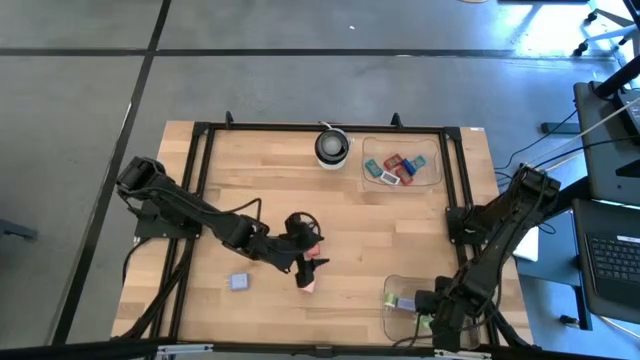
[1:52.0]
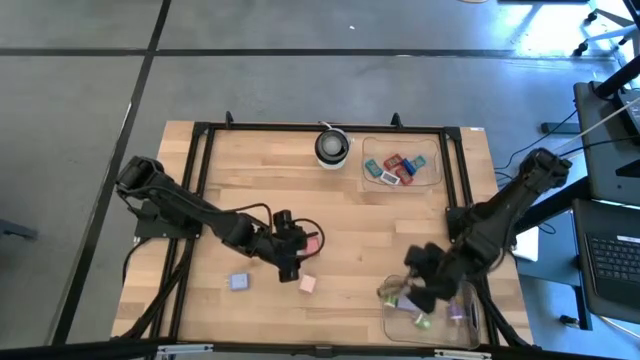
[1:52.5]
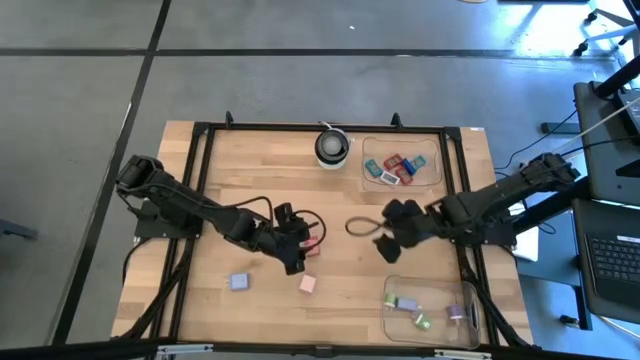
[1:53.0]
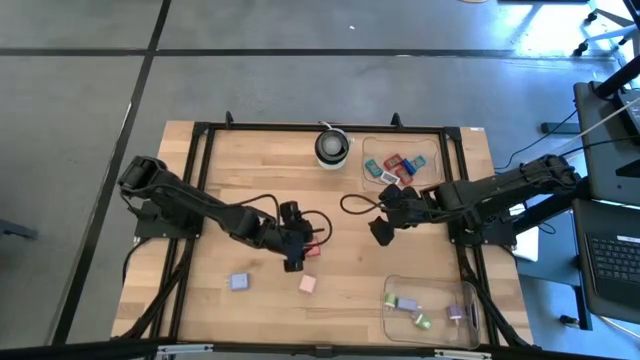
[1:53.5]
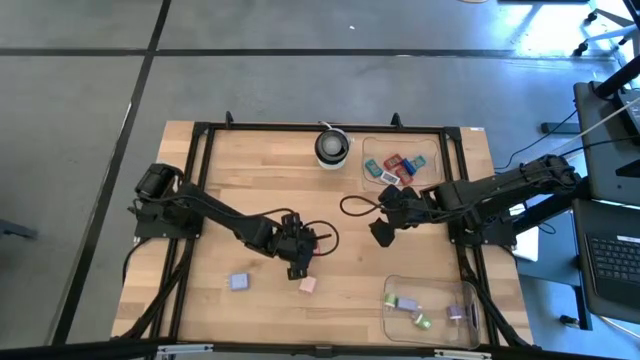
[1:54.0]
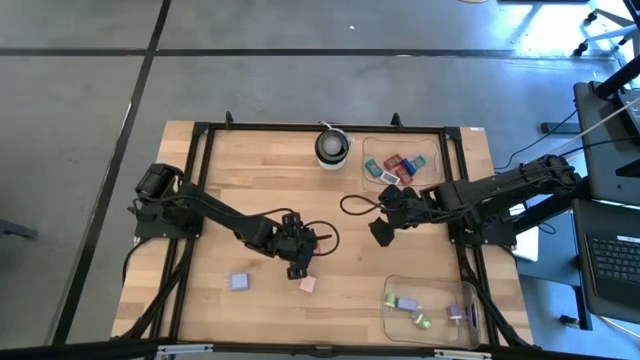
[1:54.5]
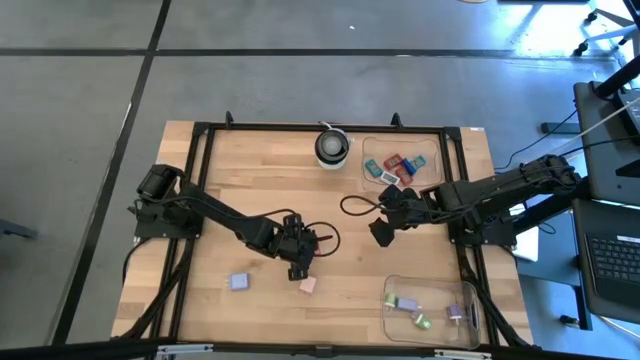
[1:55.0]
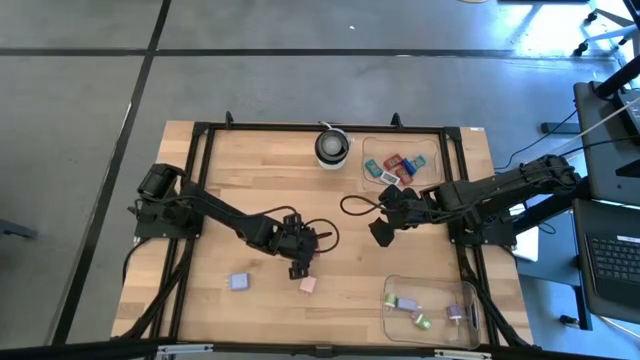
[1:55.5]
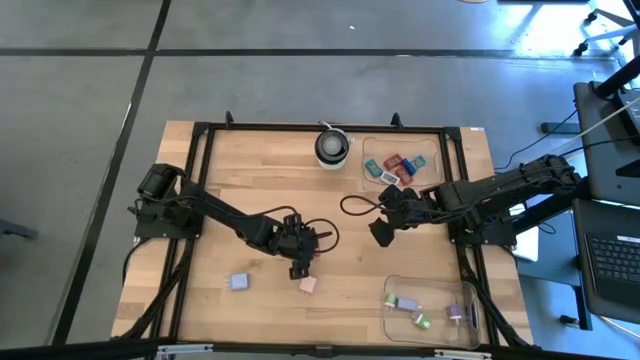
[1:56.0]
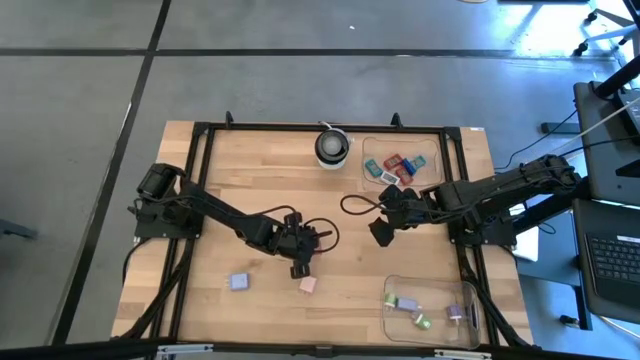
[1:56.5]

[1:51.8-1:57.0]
Task: Pick & Place Office items
Put the red charger adapter into the bottom transparent bin

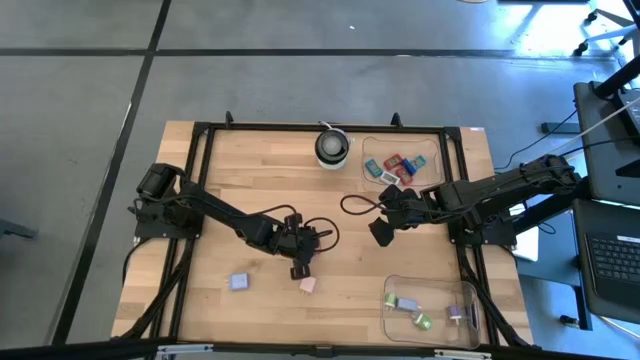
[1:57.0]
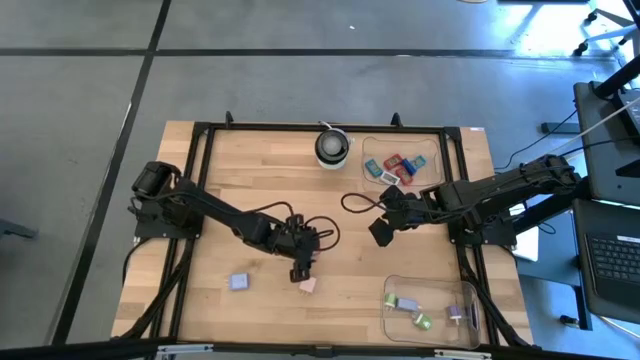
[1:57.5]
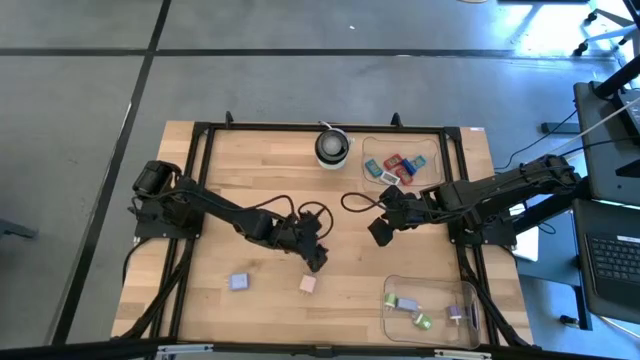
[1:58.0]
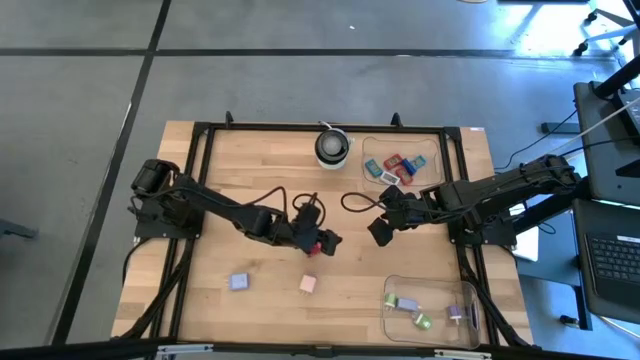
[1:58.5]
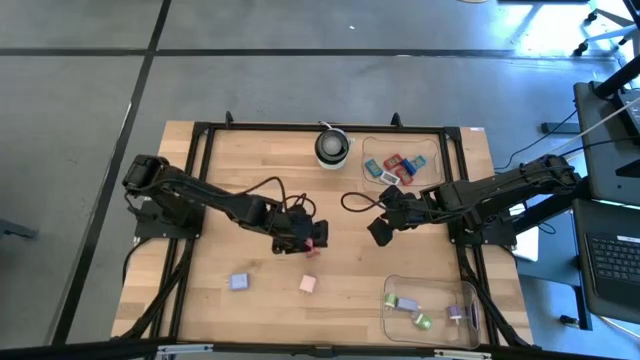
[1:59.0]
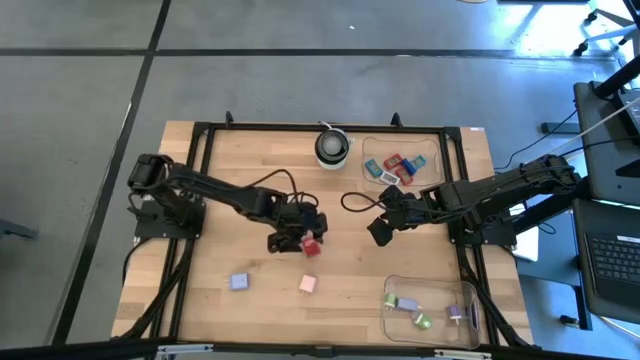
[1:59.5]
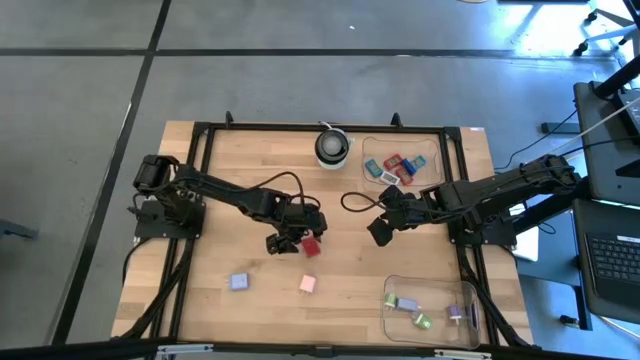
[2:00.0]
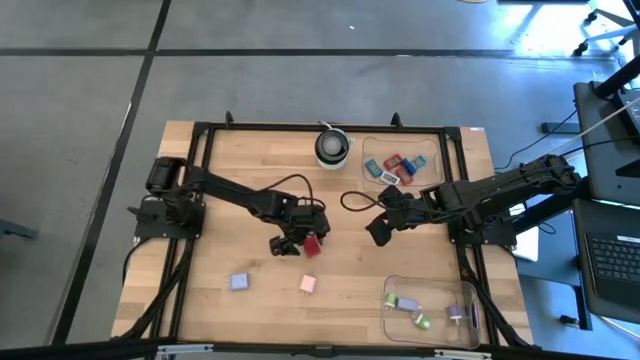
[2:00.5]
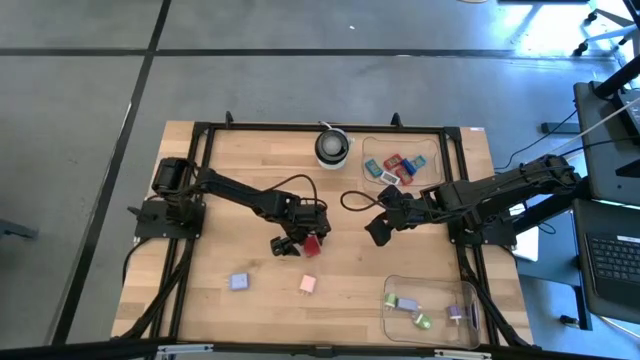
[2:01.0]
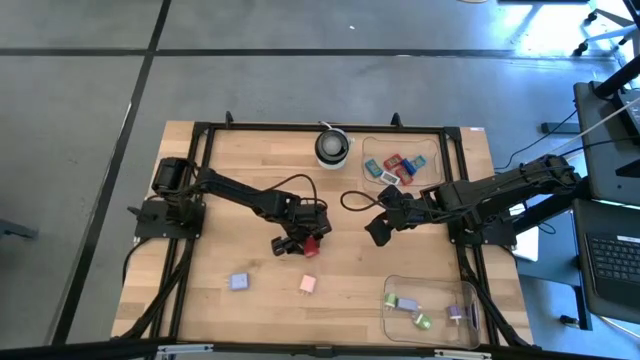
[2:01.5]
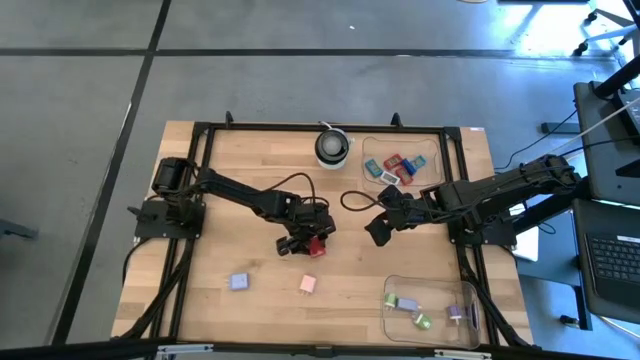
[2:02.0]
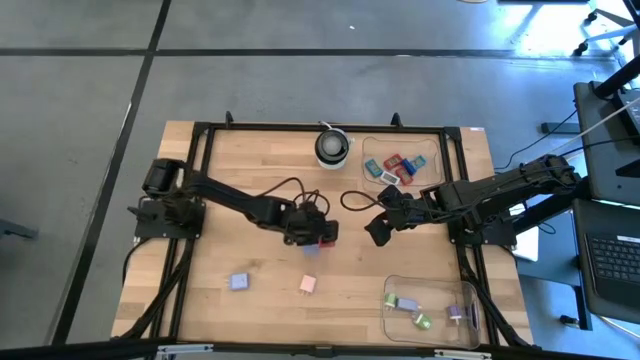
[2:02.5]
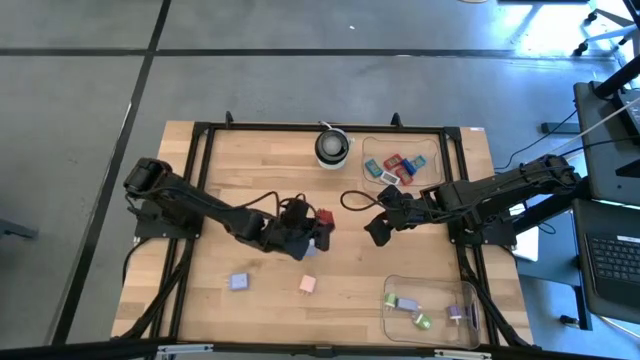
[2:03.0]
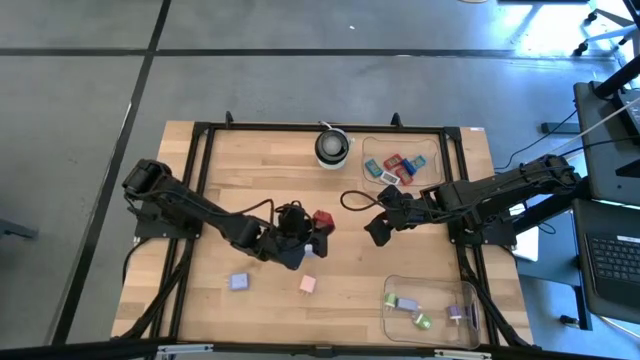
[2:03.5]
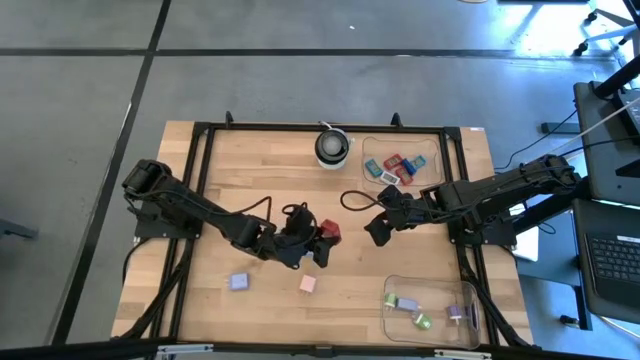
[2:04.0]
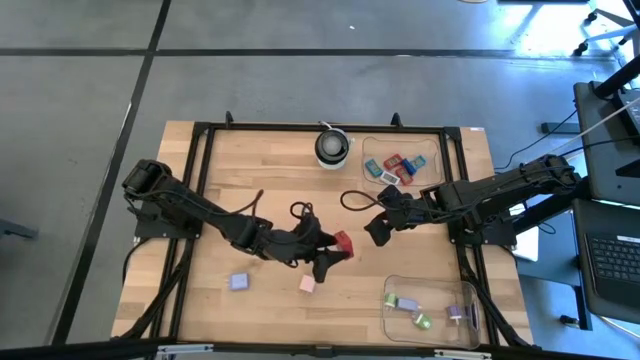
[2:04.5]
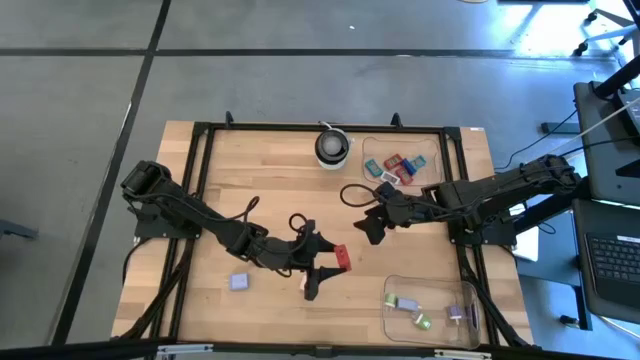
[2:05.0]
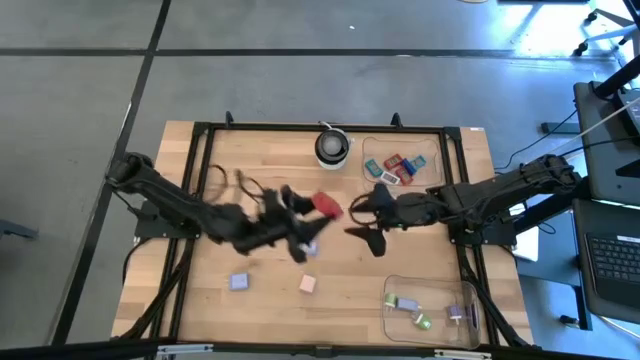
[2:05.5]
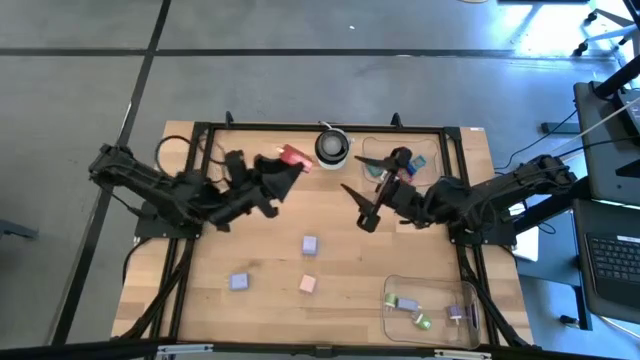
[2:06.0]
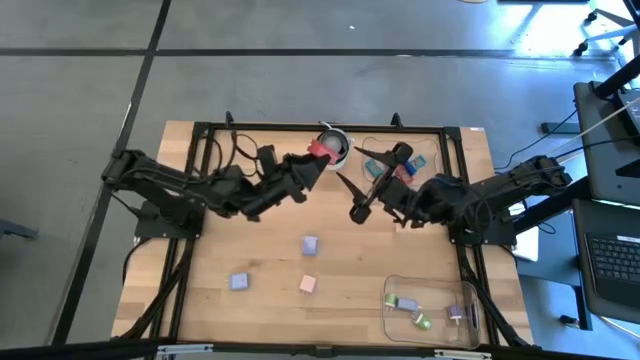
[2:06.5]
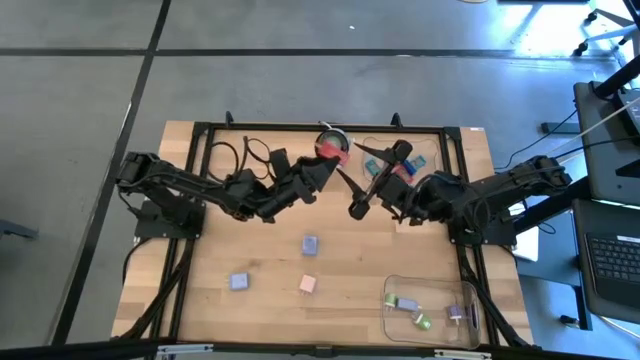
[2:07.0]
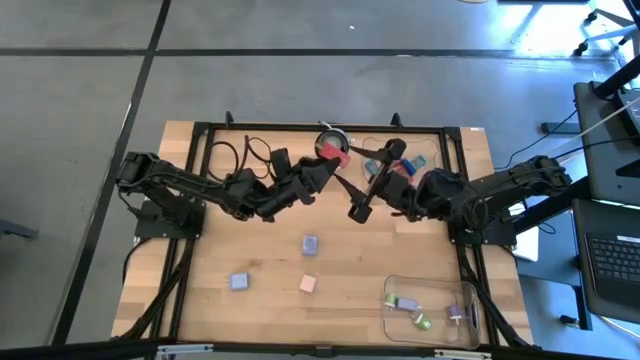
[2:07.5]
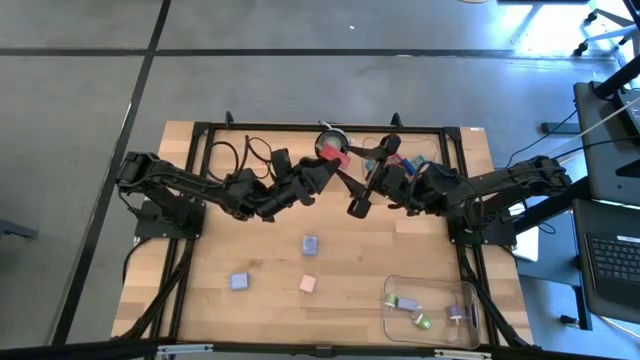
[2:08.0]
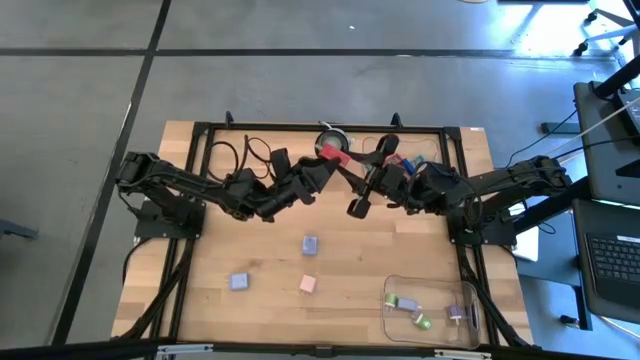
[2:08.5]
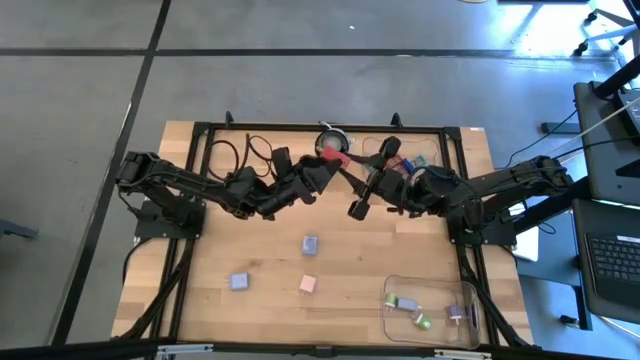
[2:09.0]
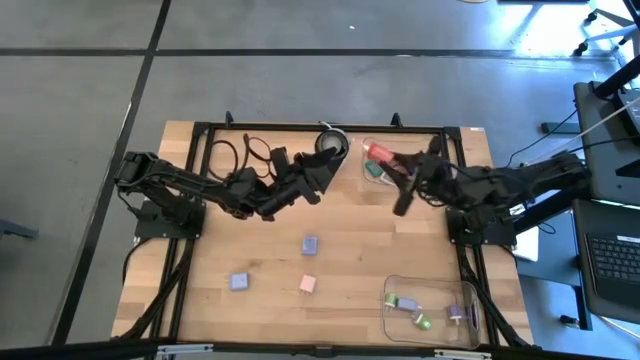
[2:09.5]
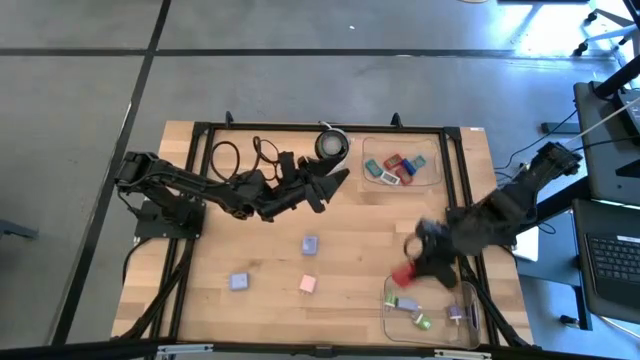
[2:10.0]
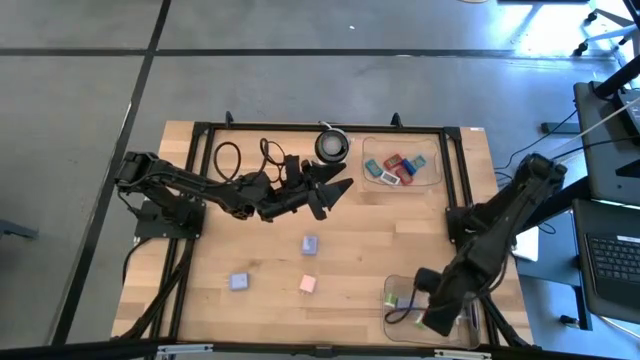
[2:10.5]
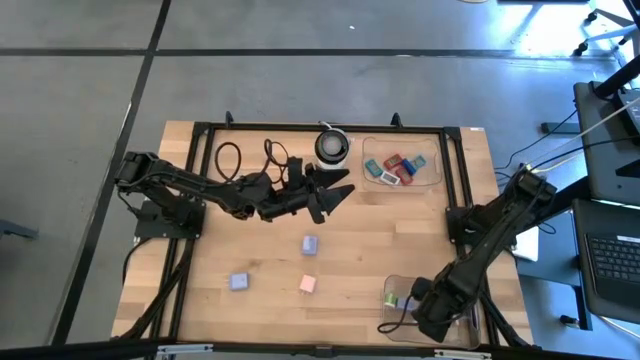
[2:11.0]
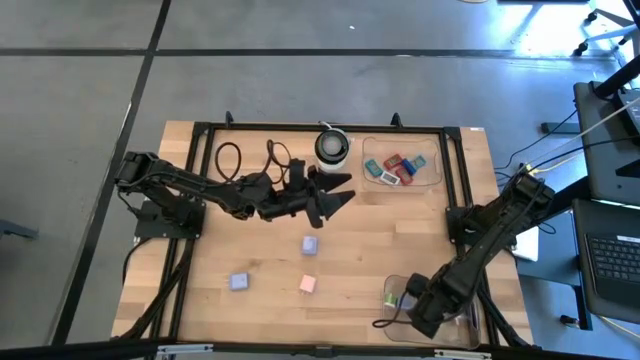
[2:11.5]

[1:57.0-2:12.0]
Put the red charger adapter into the bottom transparent bin

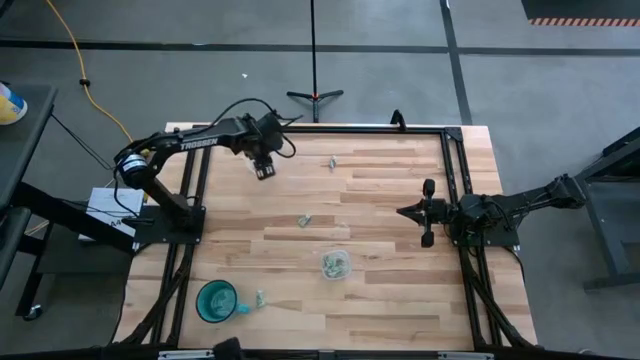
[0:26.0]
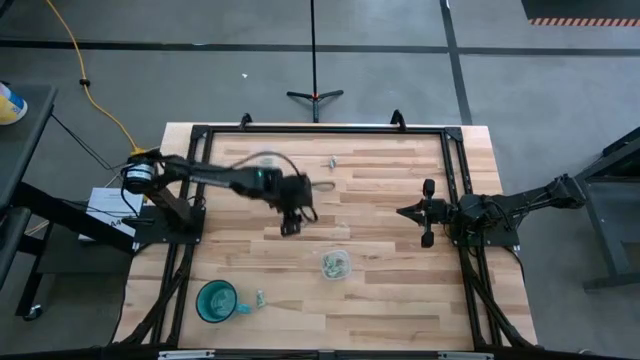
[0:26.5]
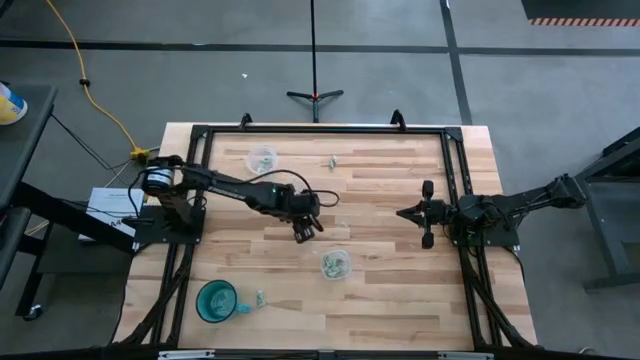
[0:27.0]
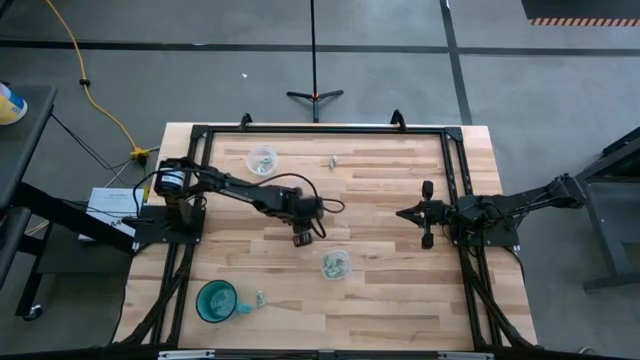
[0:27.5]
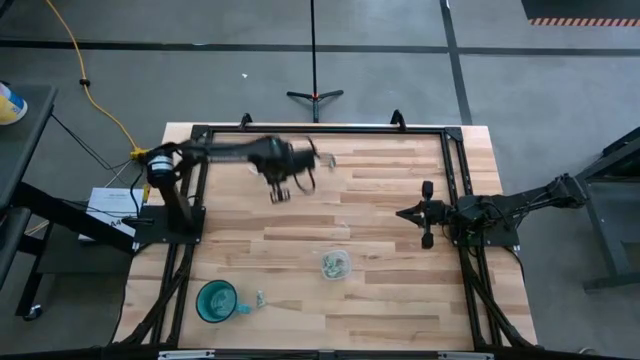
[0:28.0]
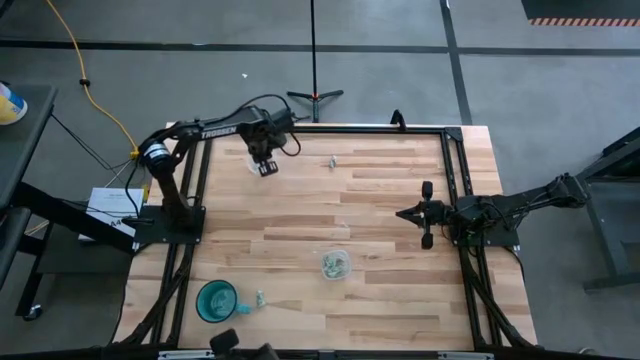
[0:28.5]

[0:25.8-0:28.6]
Task: Pick and place Stevia / Truvia into bins
Put the stevia packet into the bottom transparent container
